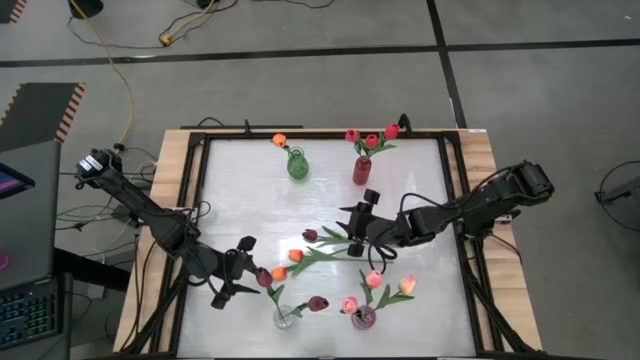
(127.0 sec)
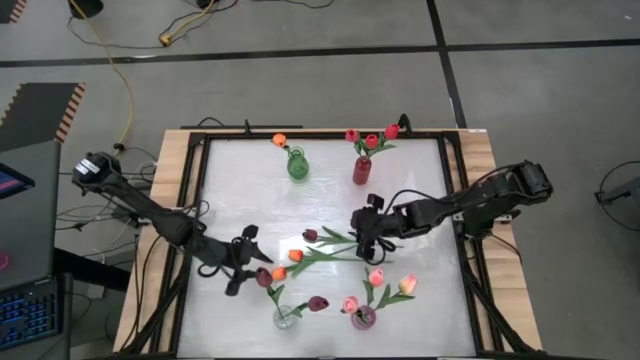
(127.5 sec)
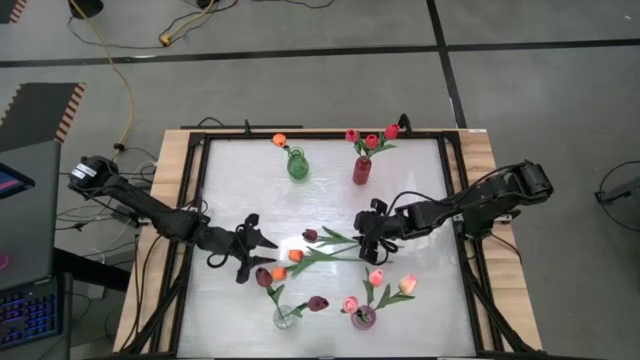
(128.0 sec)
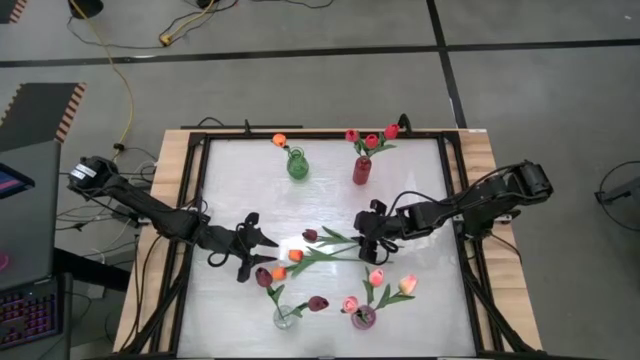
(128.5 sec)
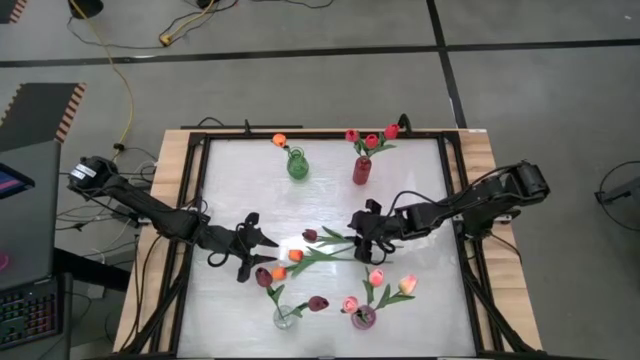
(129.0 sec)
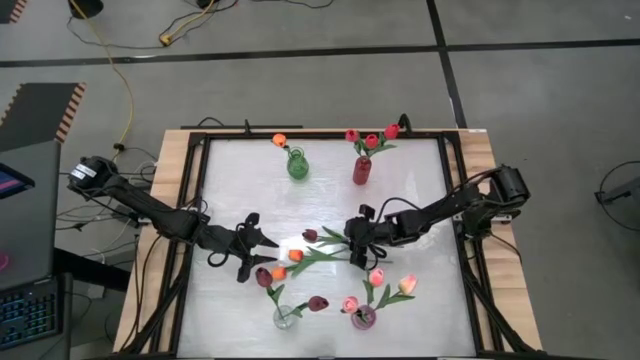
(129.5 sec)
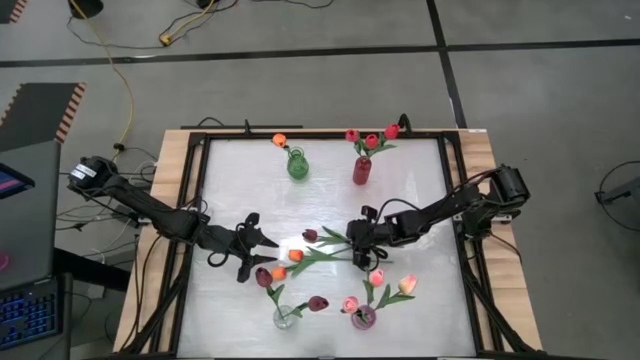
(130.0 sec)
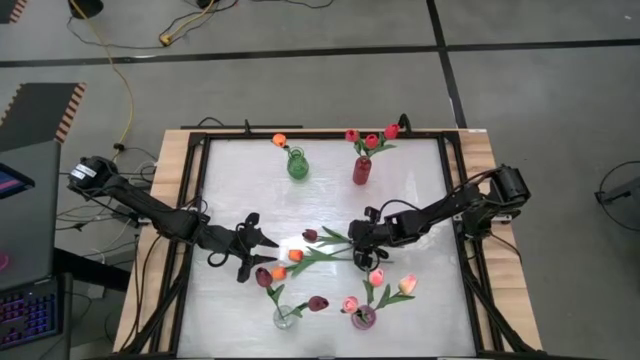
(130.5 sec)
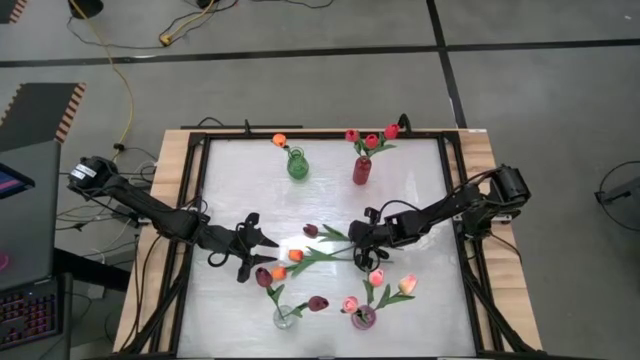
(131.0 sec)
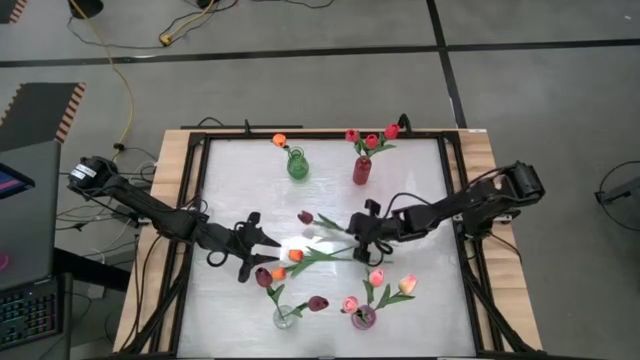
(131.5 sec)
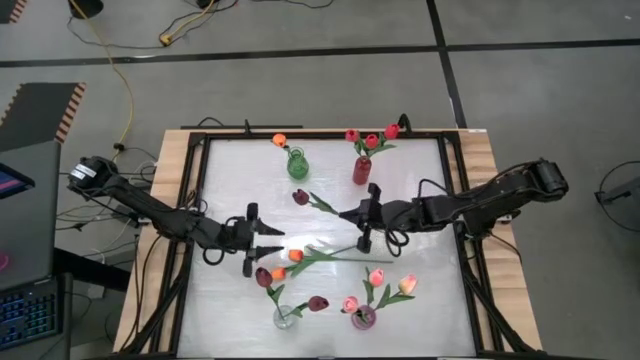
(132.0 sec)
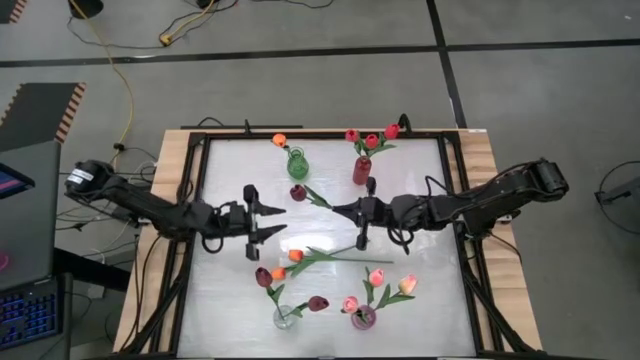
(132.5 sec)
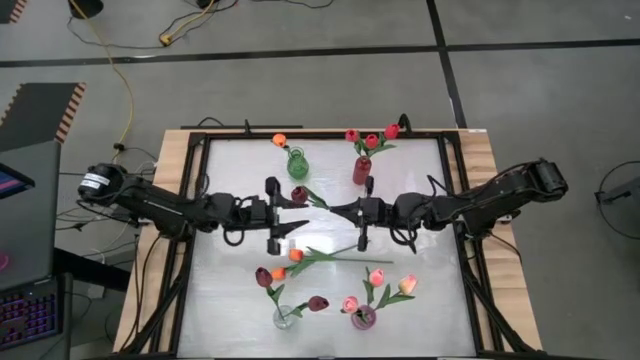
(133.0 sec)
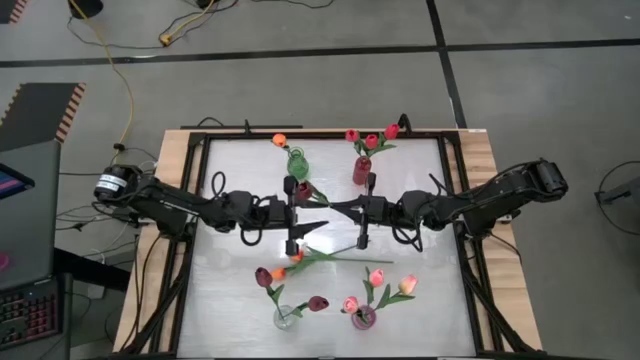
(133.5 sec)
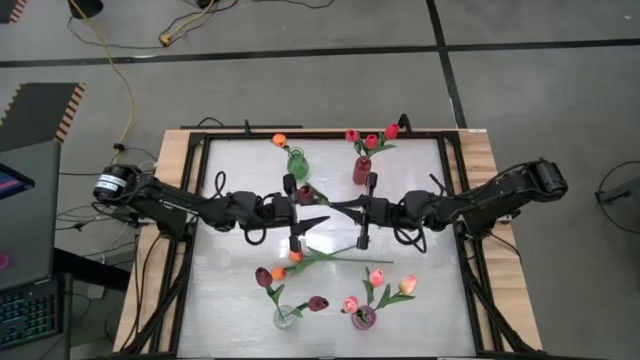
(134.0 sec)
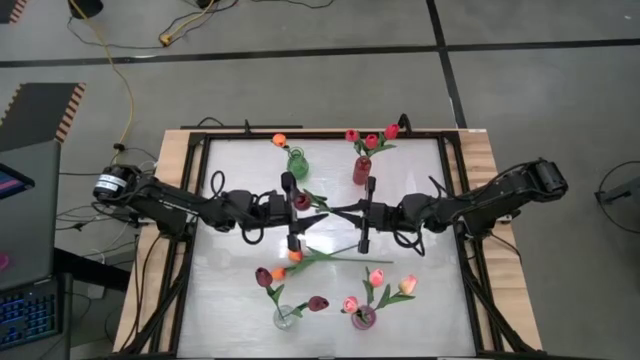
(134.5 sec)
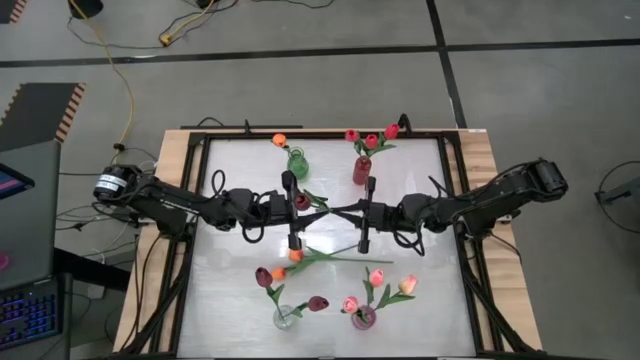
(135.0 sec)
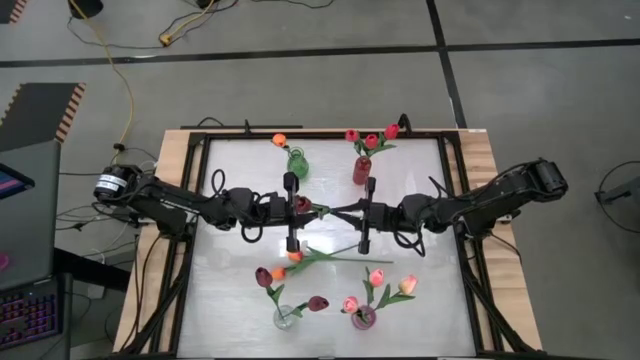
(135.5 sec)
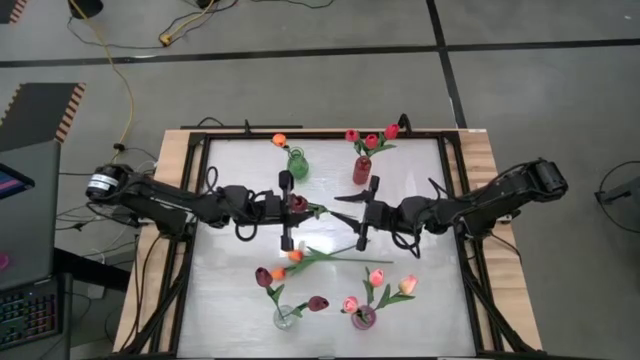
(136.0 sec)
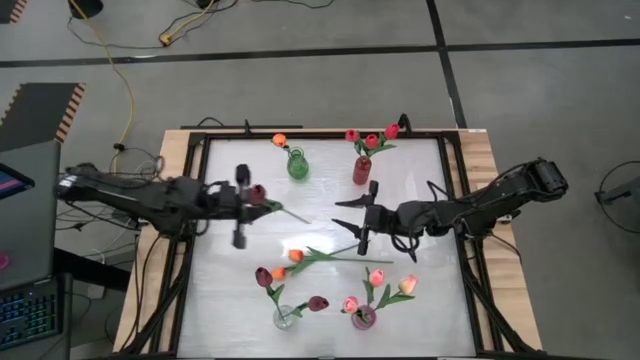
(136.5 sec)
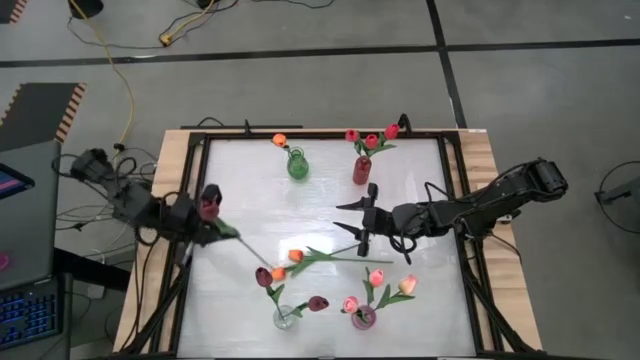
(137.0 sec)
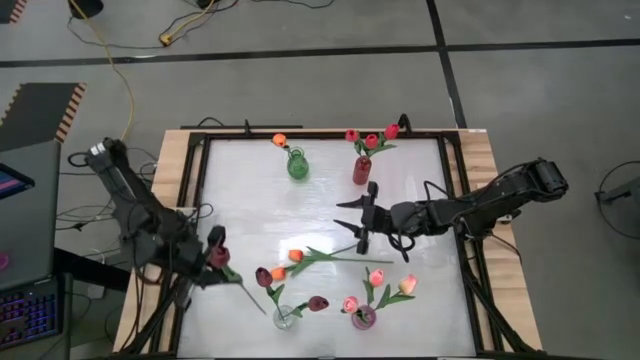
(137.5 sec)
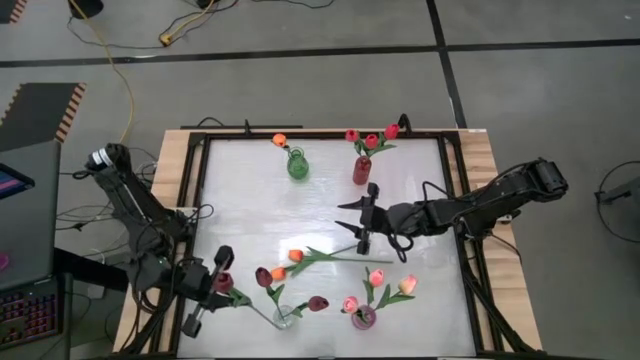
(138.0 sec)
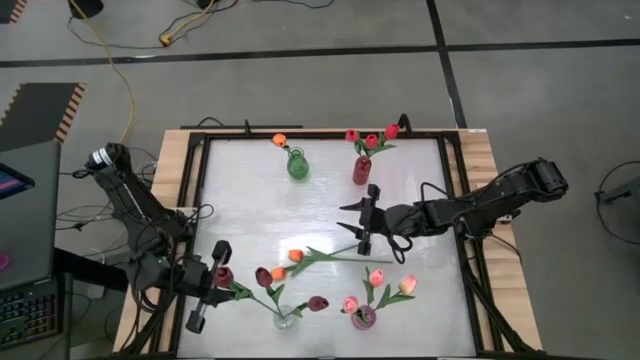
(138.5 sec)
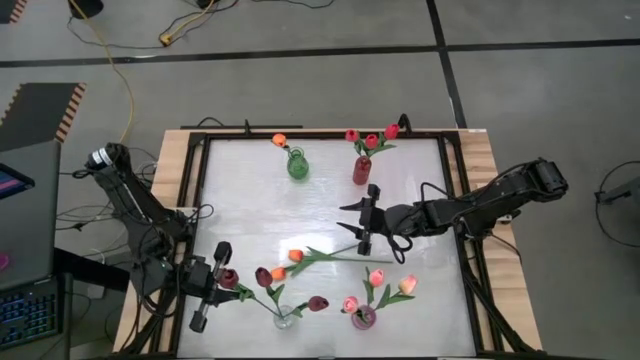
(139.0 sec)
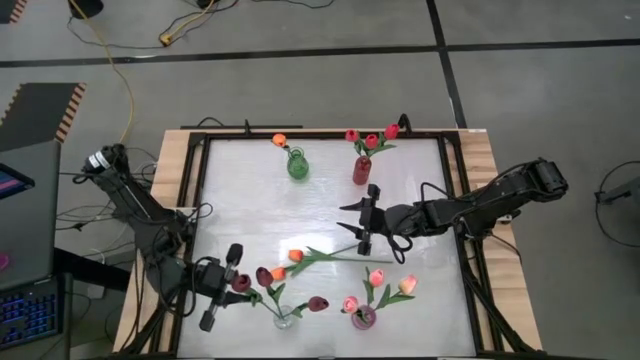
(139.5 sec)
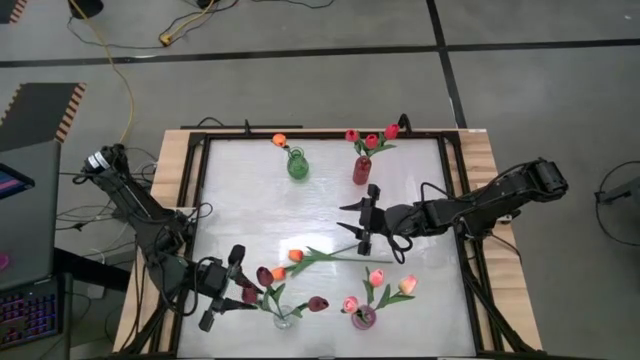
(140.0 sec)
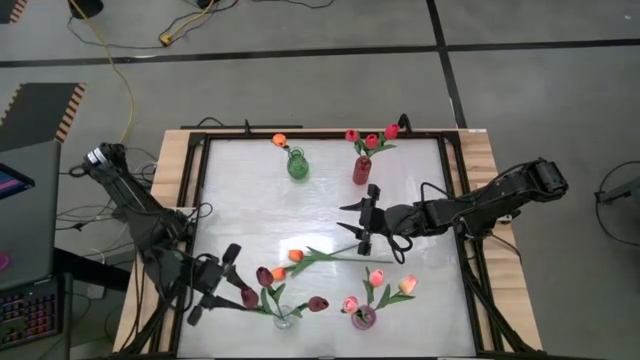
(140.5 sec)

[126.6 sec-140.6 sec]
Task: Sort flowers into vase by color
Put the dark red flower into the transparent vase

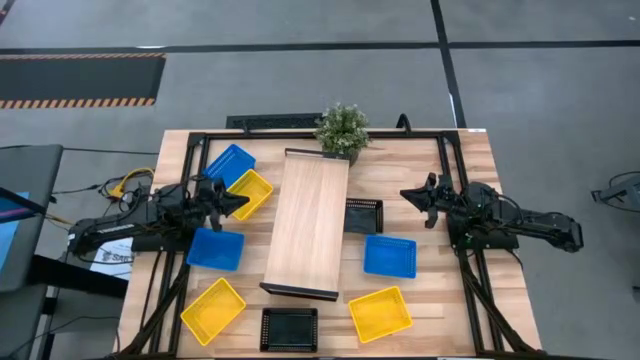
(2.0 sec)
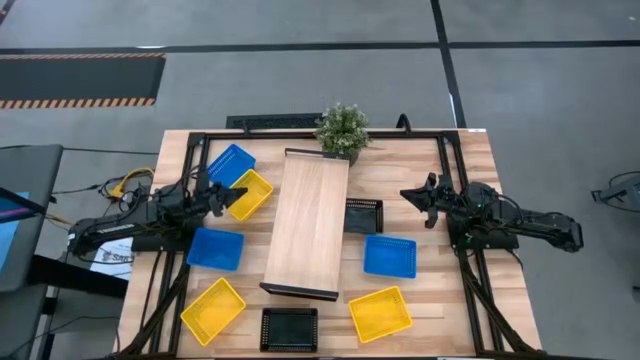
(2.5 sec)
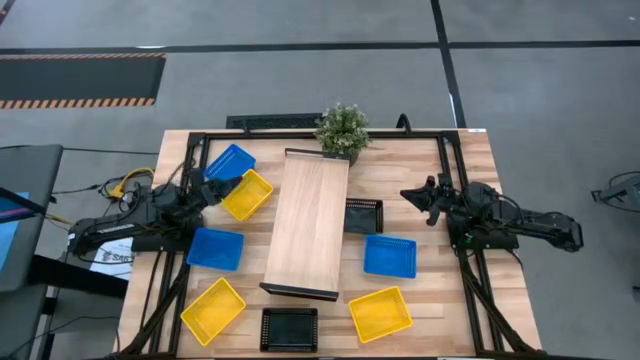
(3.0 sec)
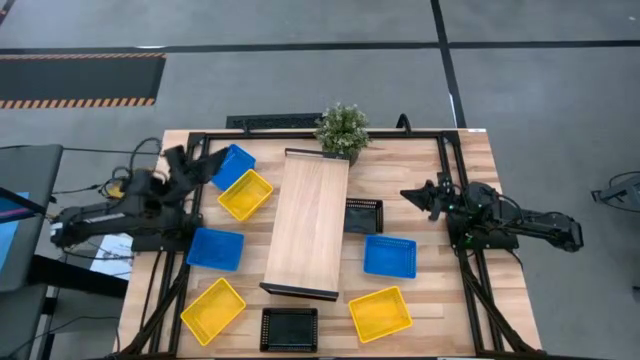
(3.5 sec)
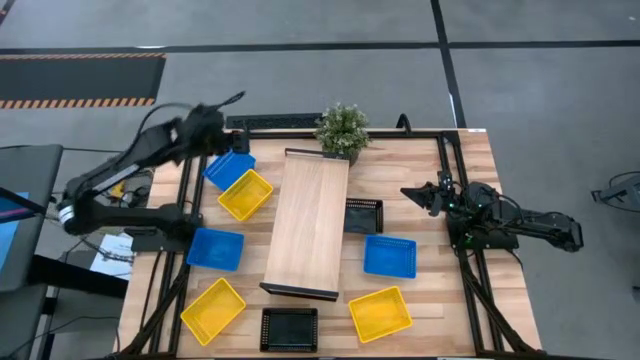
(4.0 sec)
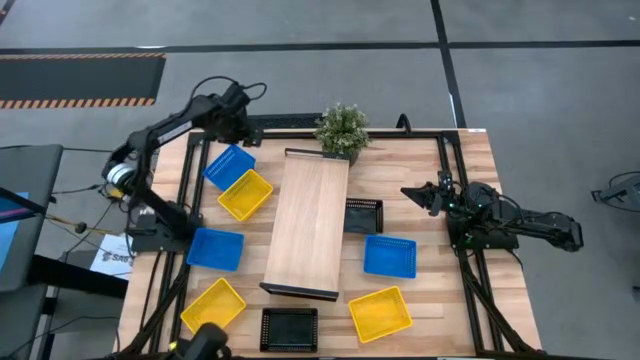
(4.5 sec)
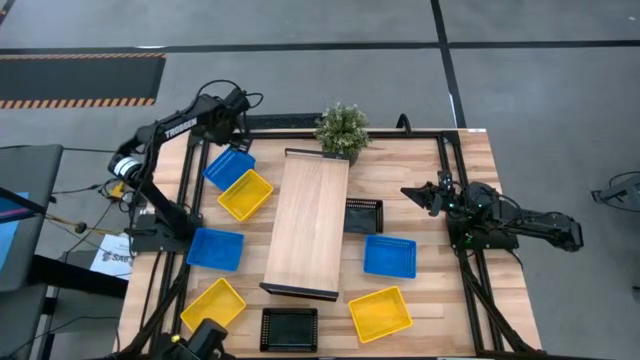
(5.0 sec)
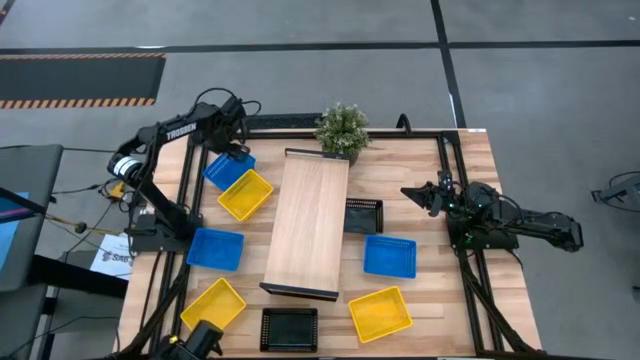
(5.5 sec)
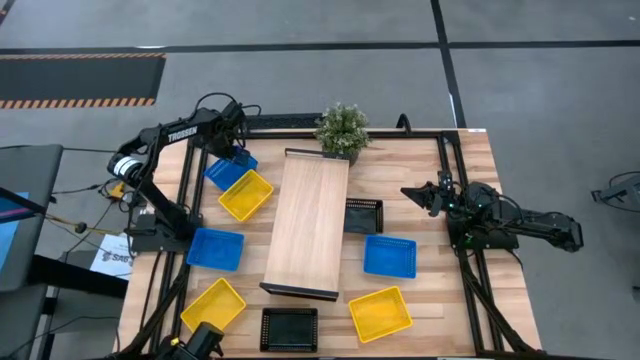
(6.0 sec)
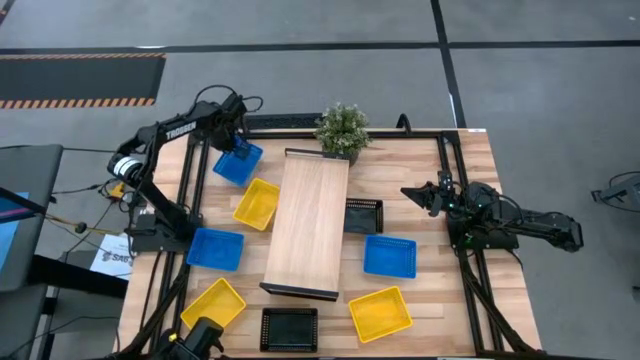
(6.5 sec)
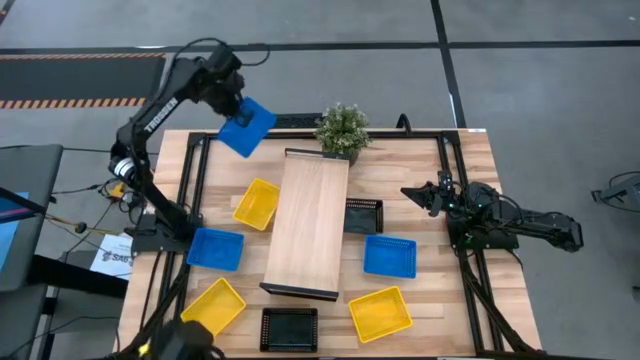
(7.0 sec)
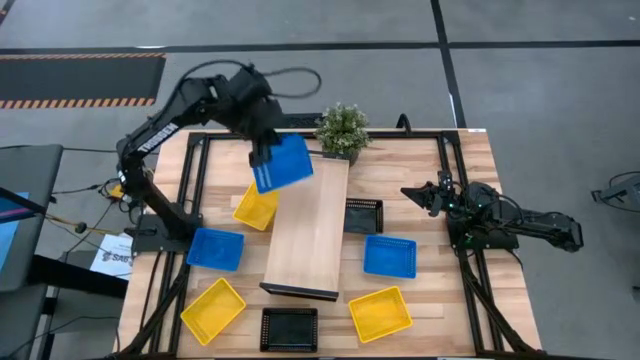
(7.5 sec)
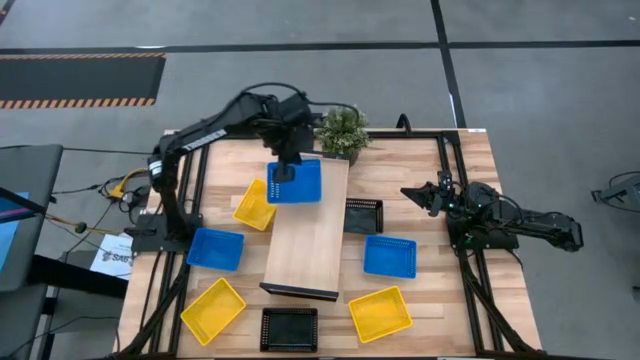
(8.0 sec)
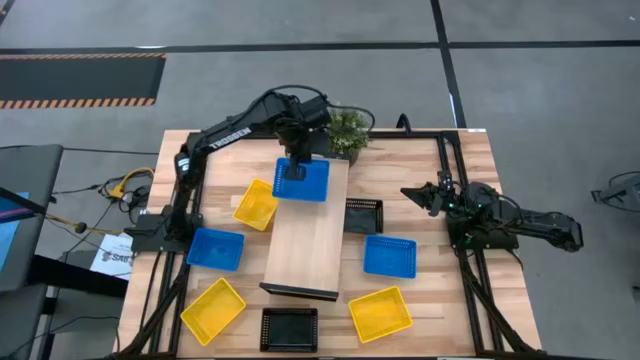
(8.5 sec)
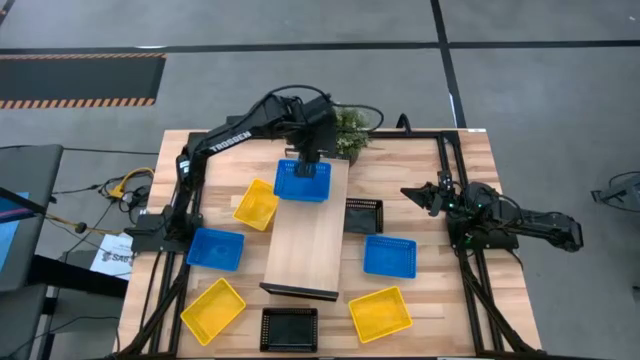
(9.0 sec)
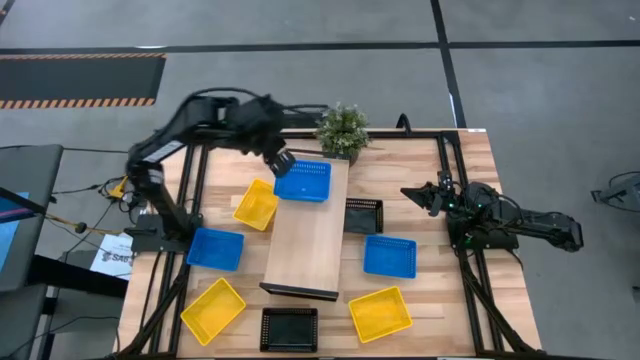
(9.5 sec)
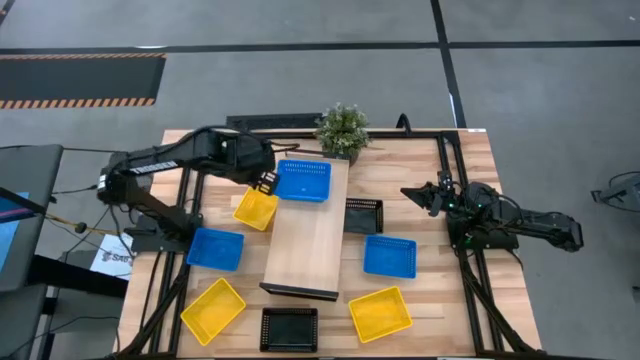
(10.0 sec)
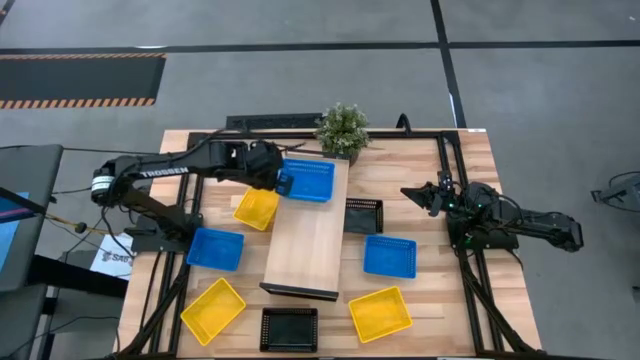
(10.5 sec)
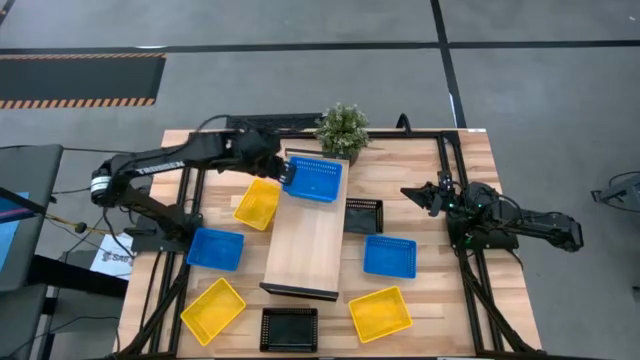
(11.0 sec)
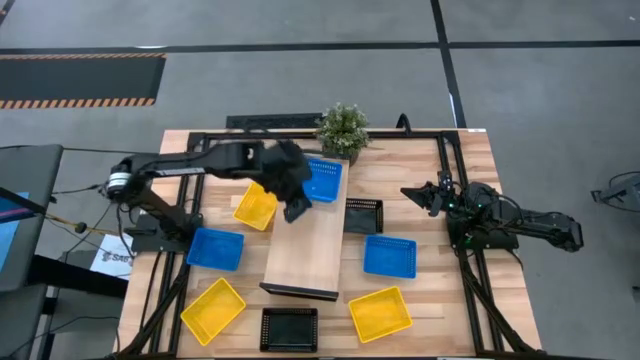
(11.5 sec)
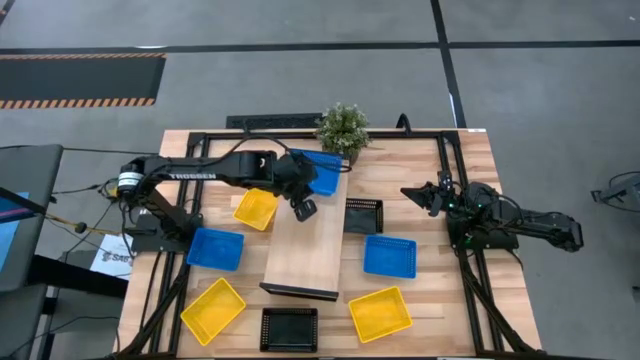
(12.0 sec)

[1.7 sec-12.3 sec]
Task: Stack baskets on shelf by color
Put the top left blue basket on the shelf
